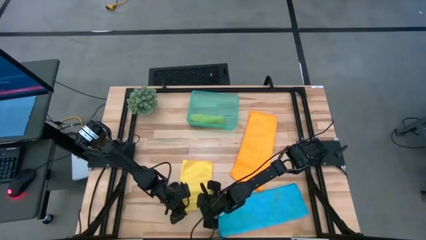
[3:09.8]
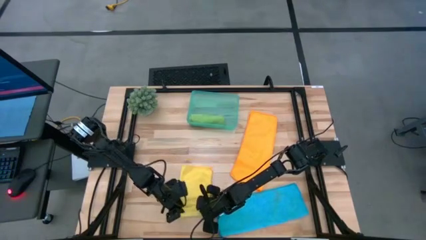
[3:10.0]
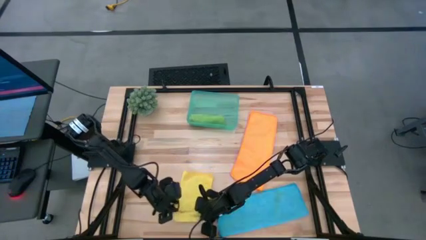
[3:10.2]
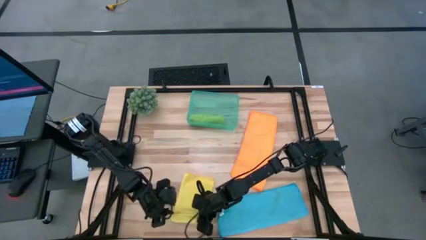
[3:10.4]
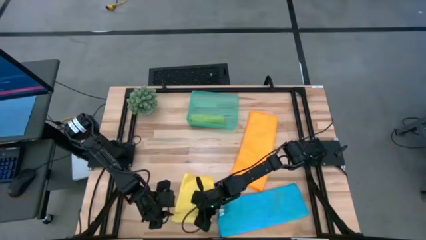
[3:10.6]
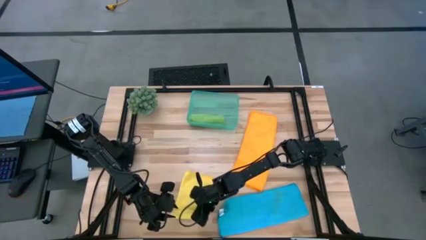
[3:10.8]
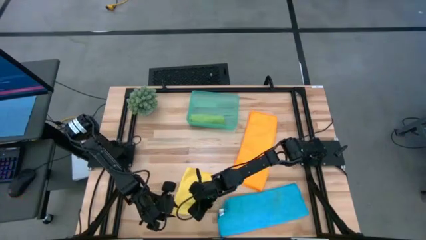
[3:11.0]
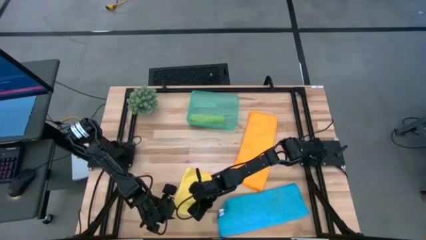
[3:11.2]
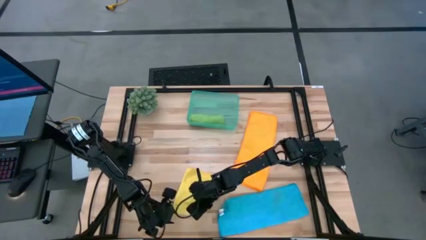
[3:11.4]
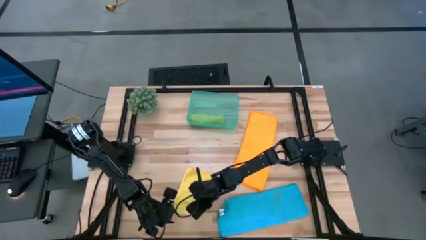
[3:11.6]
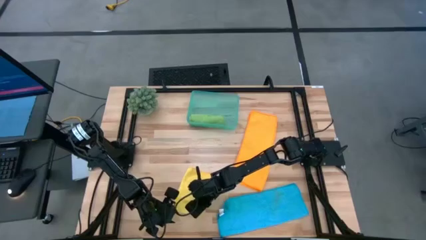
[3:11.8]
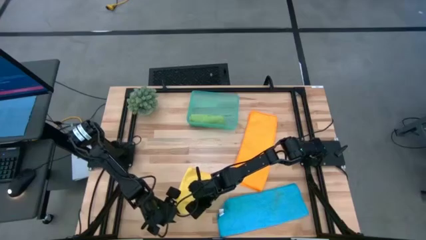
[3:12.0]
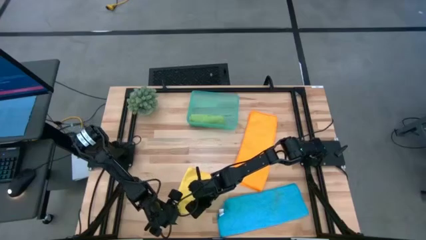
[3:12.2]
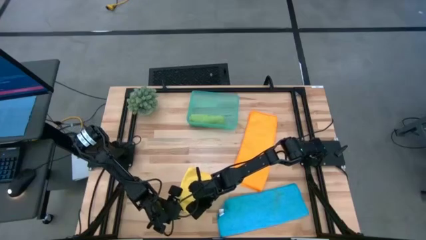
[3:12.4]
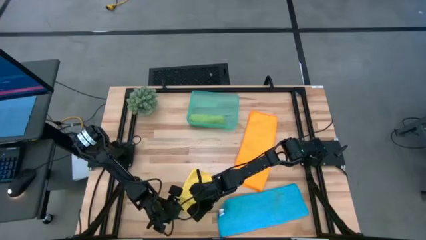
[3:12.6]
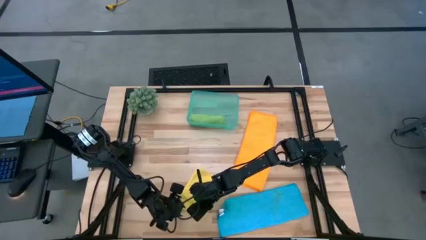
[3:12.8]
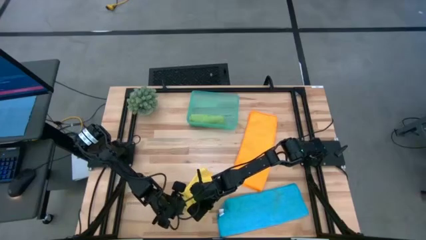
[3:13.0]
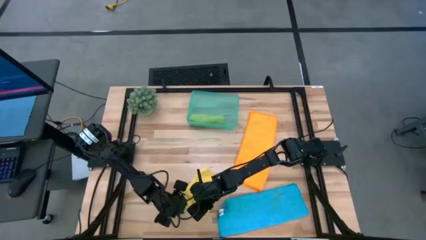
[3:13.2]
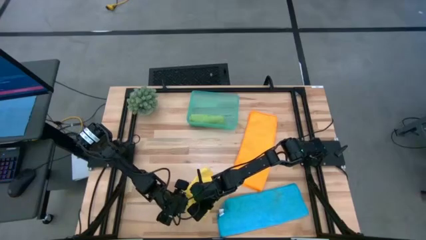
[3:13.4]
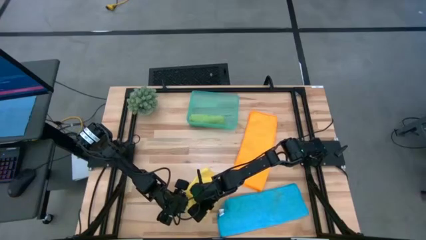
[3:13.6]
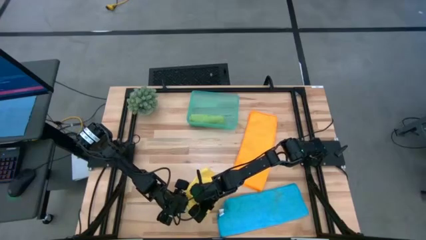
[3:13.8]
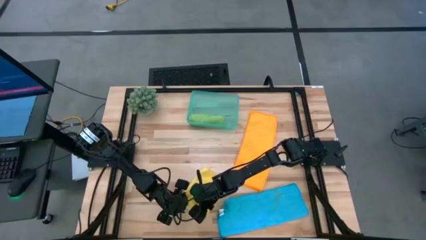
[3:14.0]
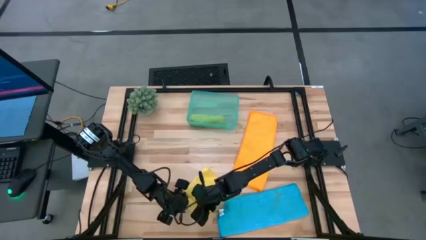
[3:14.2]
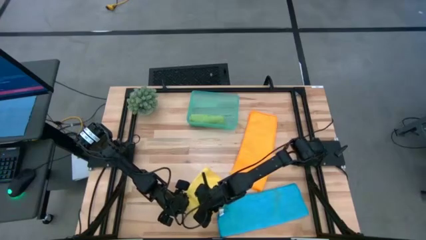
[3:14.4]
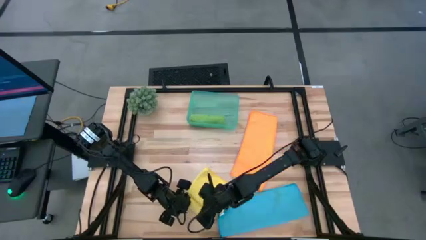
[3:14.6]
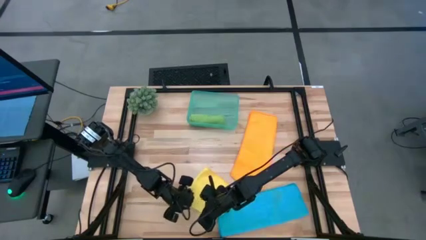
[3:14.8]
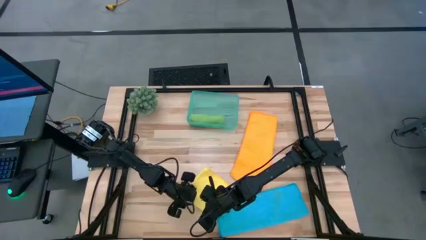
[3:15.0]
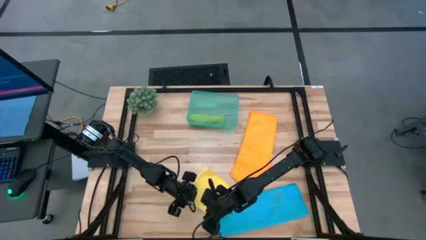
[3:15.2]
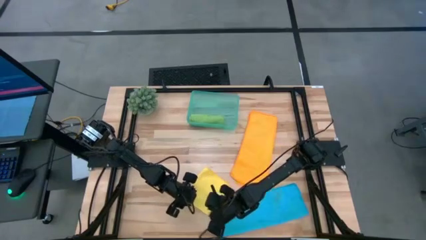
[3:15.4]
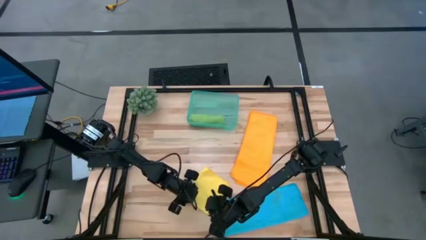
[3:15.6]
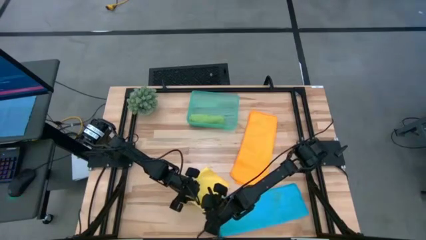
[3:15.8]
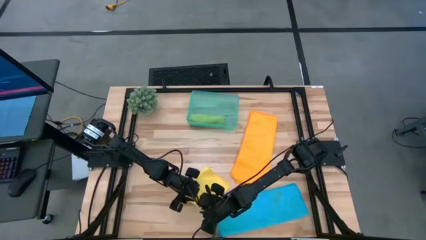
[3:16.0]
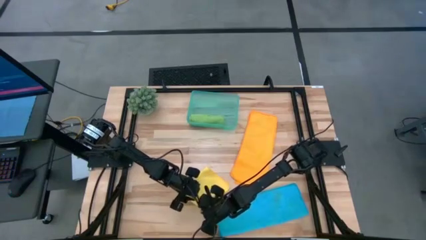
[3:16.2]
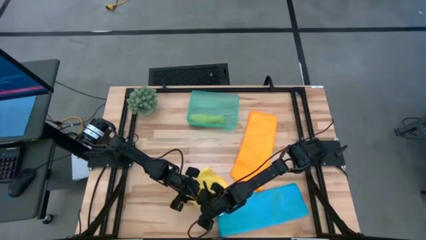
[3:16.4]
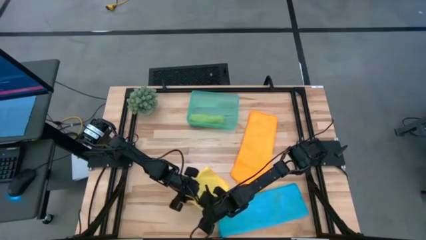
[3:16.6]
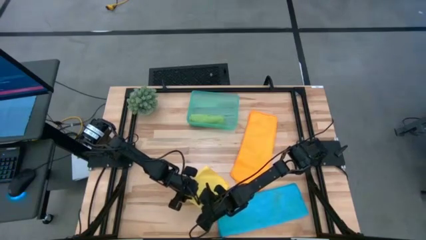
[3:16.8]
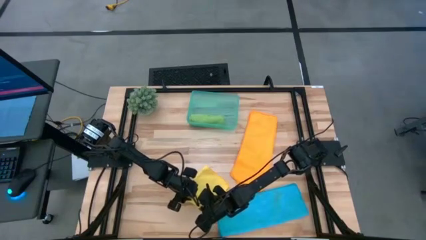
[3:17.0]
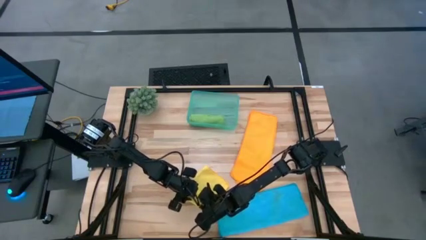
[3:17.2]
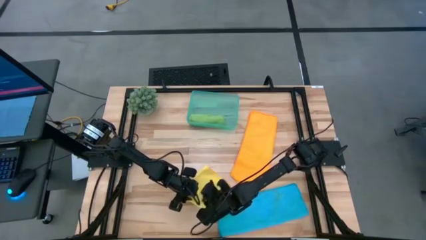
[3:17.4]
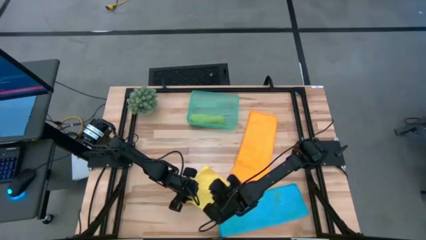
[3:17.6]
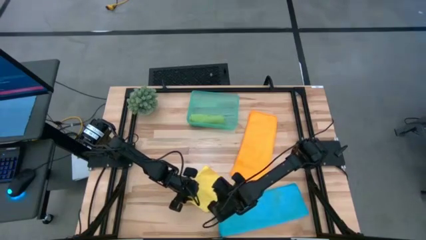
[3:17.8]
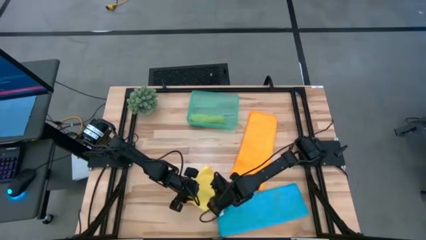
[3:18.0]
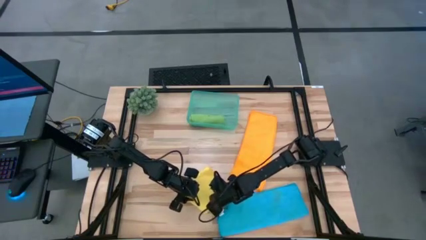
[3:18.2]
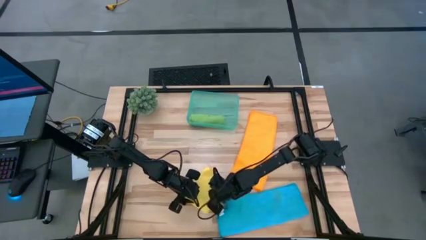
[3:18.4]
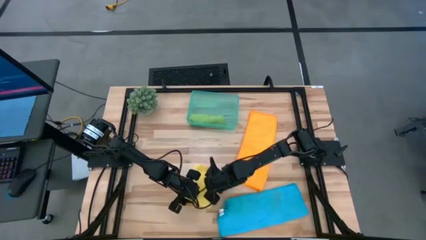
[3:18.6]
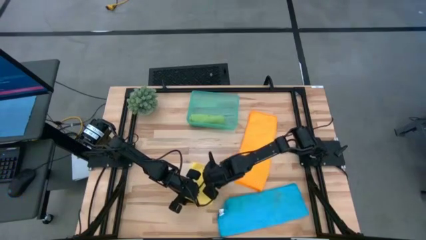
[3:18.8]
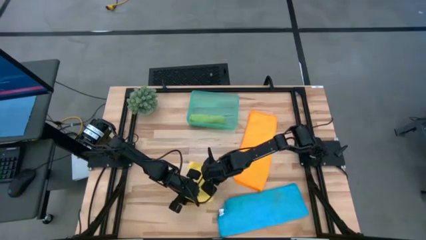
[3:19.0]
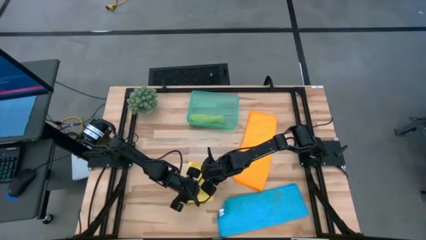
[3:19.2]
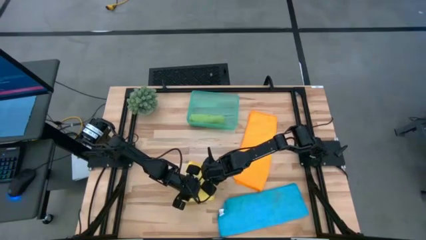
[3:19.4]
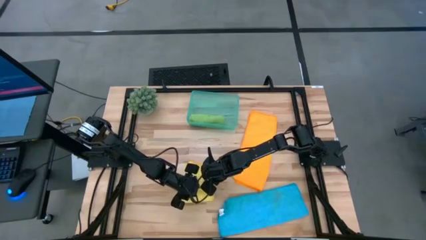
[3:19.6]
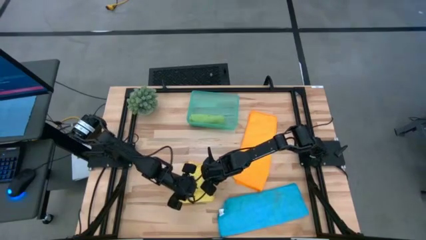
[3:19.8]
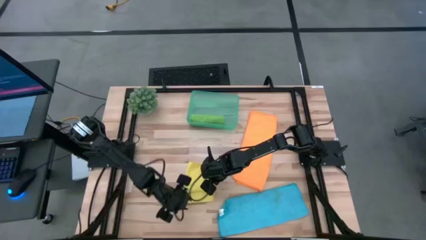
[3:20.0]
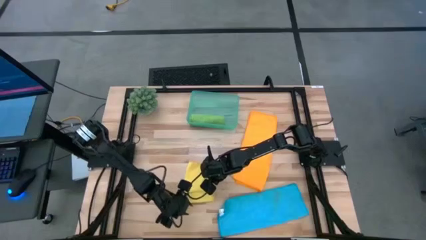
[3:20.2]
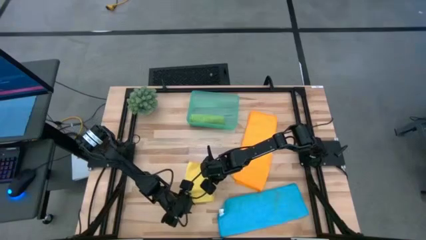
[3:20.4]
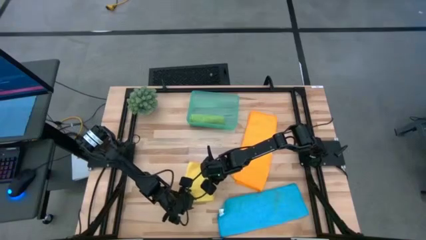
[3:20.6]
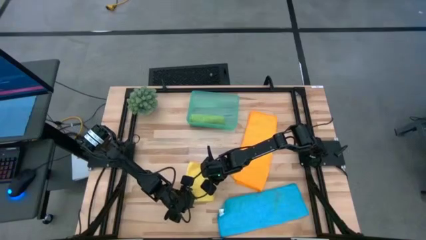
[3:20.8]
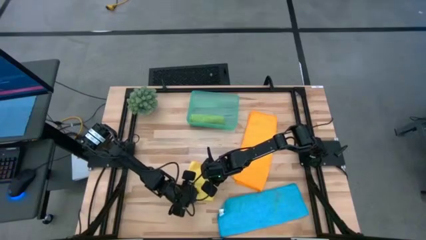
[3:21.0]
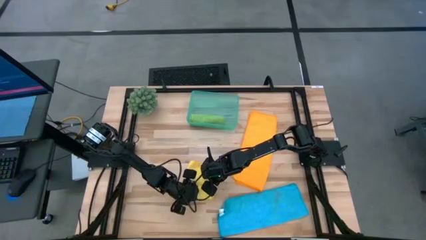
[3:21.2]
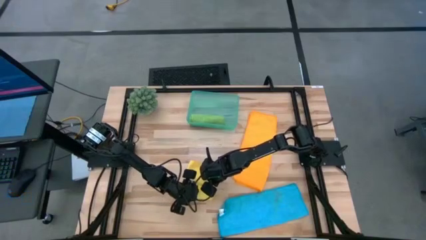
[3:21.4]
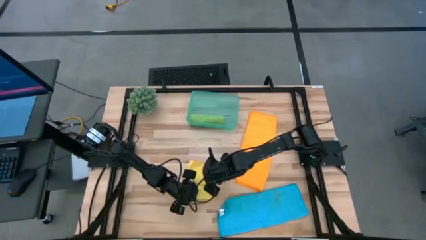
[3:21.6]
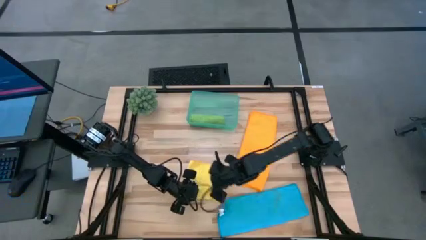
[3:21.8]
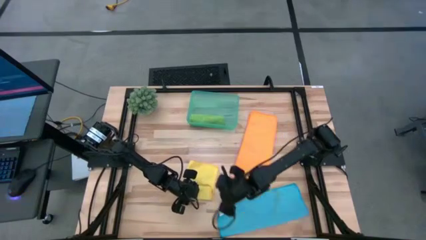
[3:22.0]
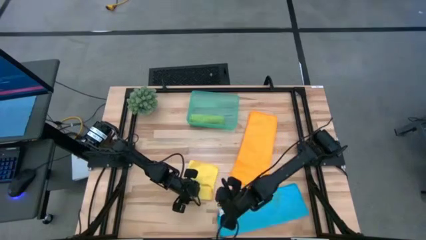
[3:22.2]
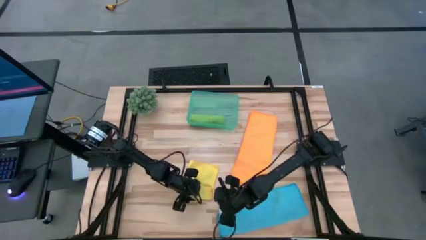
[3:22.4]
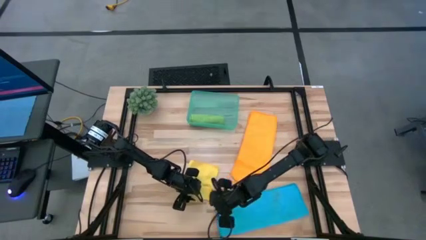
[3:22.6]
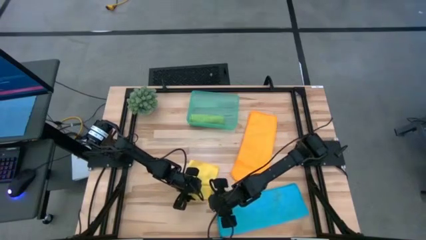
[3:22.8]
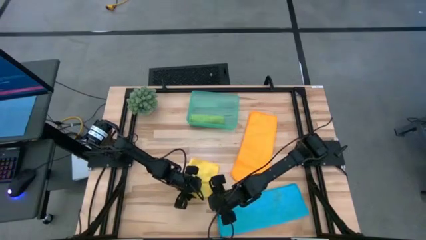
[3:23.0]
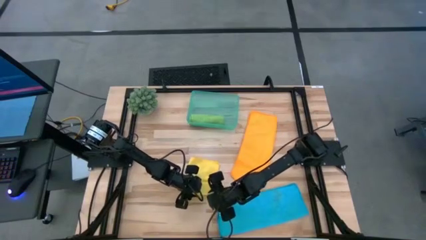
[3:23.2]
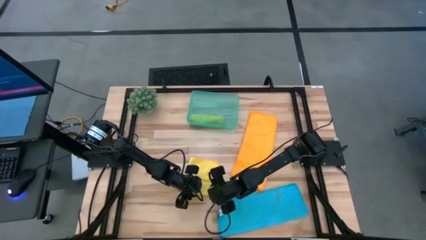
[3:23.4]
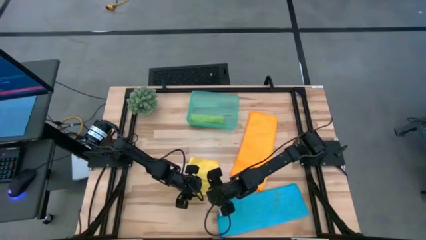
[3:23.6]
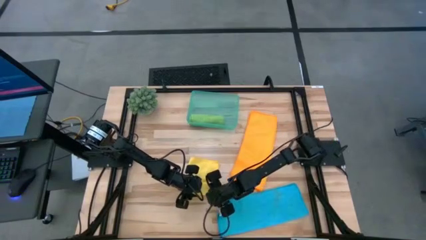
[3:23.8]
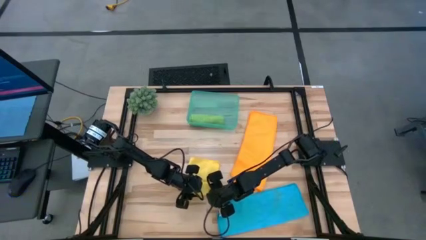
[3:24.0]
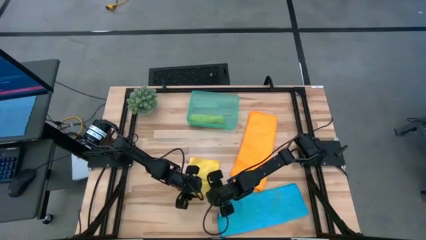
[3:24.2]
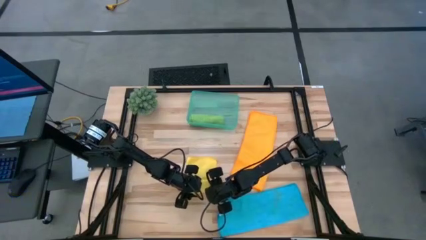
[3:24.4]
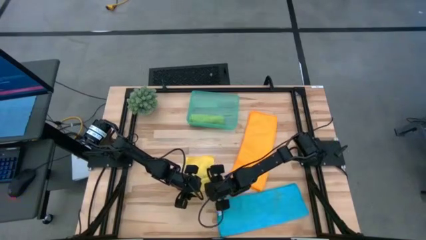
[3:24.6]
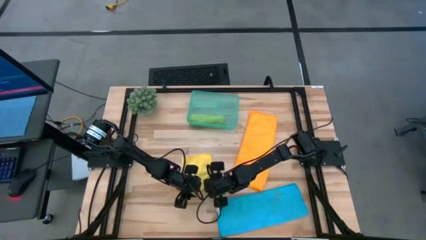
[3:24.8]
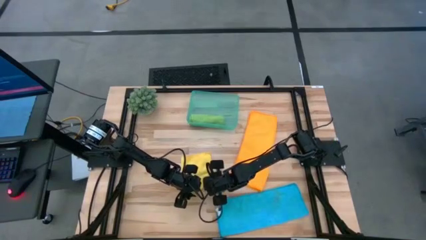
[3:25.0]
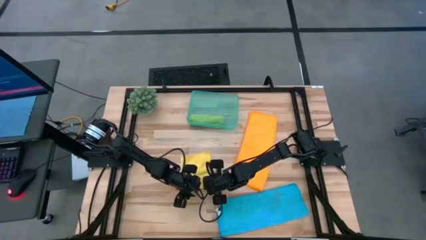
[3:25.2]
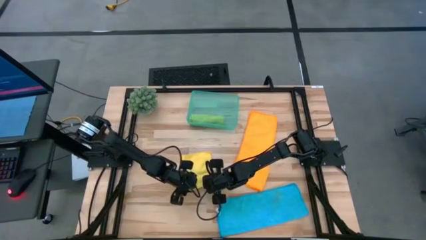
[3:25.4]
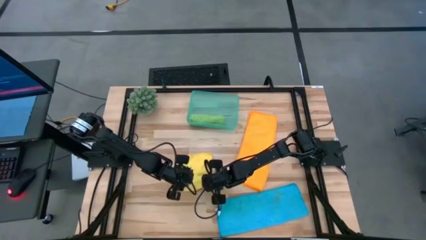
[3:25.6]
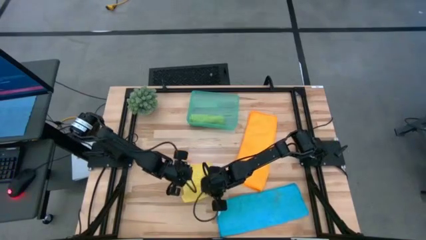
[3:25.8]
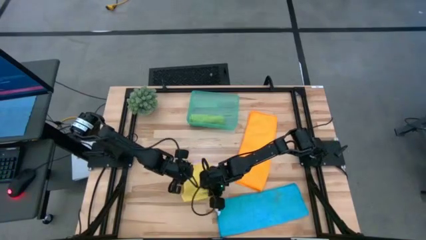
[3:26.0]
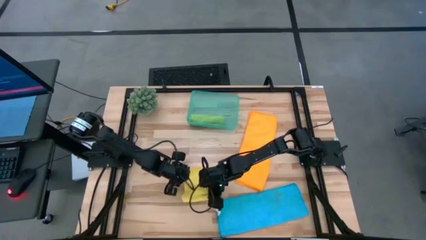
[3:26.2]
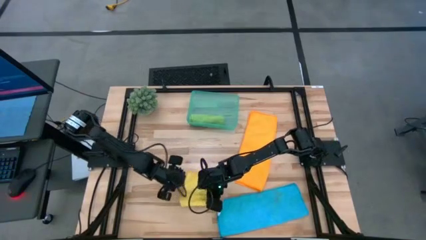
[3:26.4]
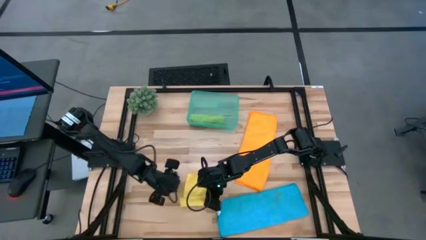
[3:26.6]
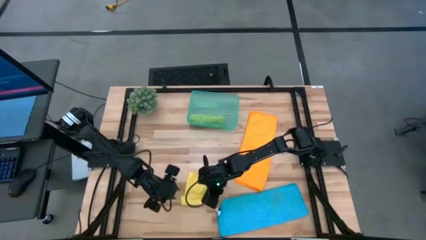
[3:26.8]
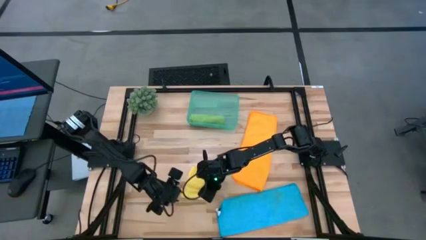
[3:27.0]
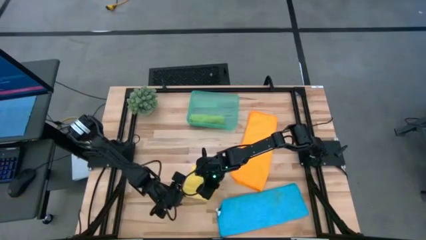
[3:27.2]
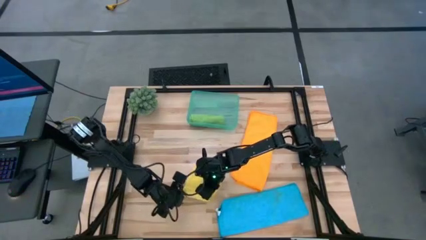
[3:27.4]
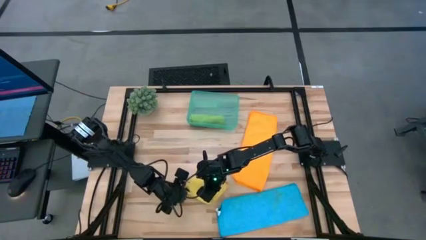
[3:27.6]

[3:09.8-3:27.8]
Task: Roll microfiber towels into tight, uniform cylinder then place into a basket
Roll the yellow towel
